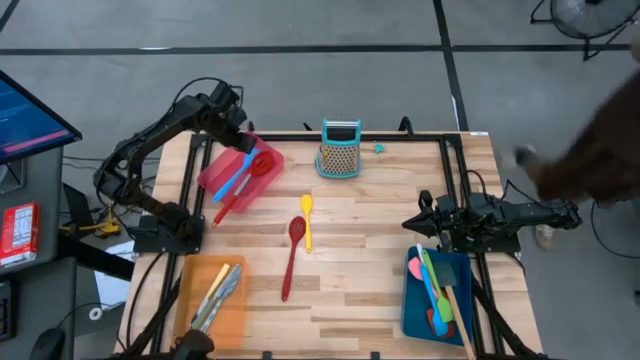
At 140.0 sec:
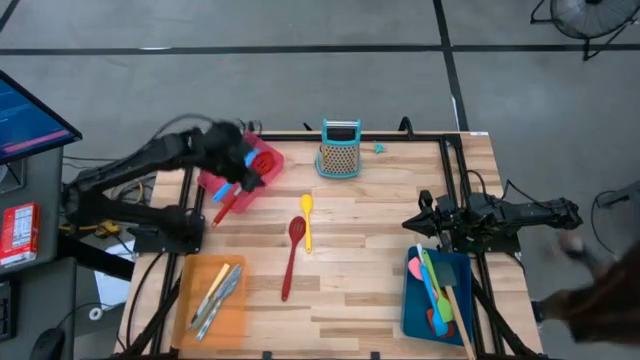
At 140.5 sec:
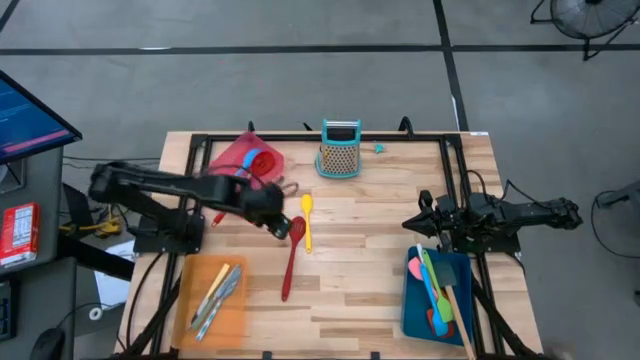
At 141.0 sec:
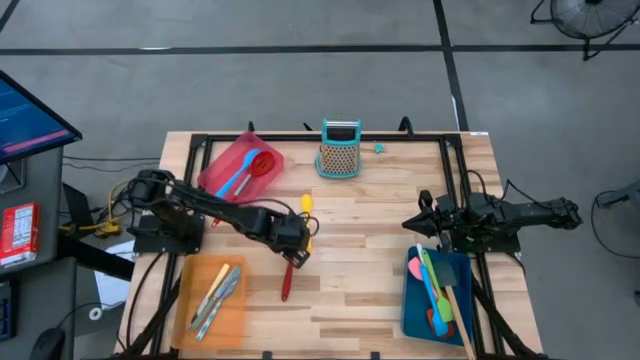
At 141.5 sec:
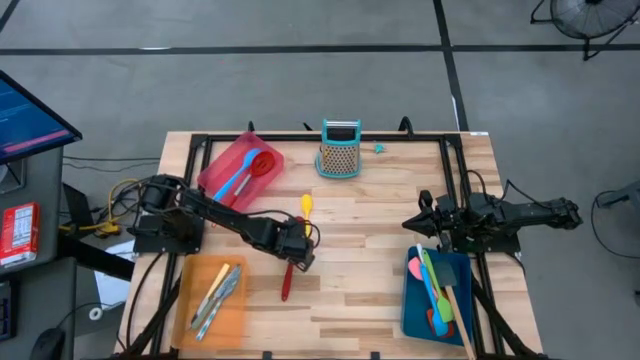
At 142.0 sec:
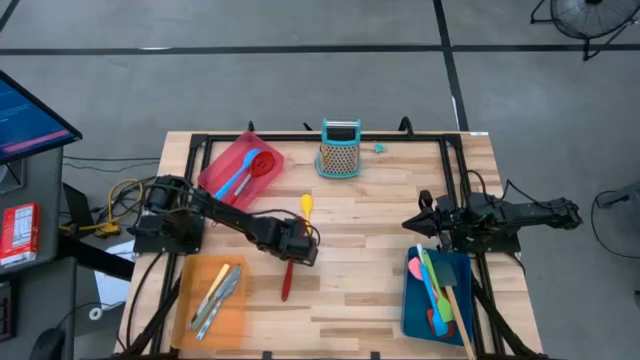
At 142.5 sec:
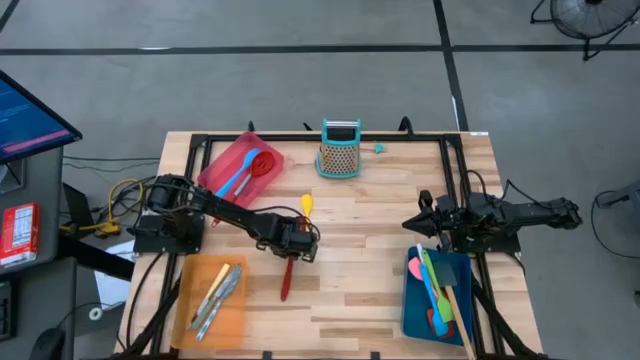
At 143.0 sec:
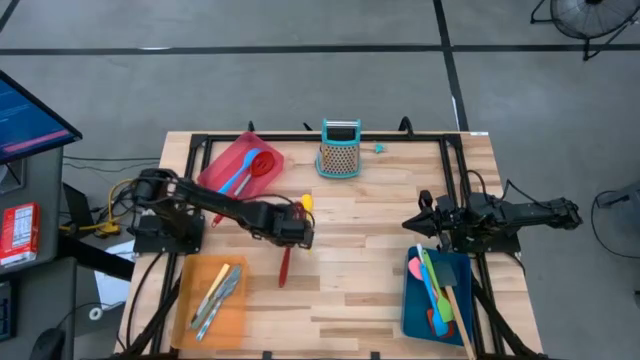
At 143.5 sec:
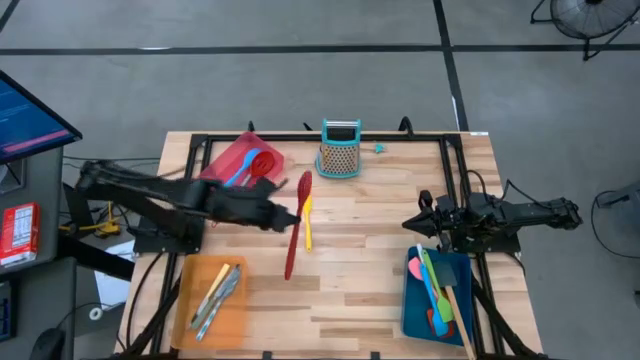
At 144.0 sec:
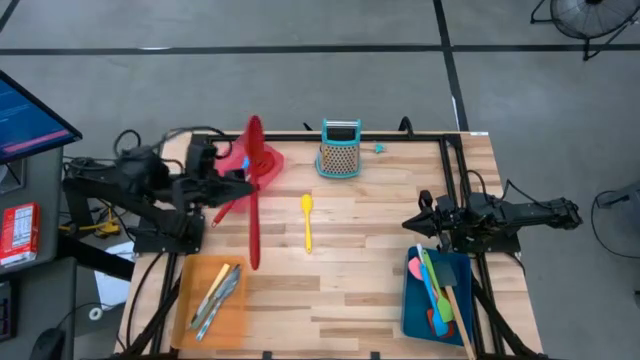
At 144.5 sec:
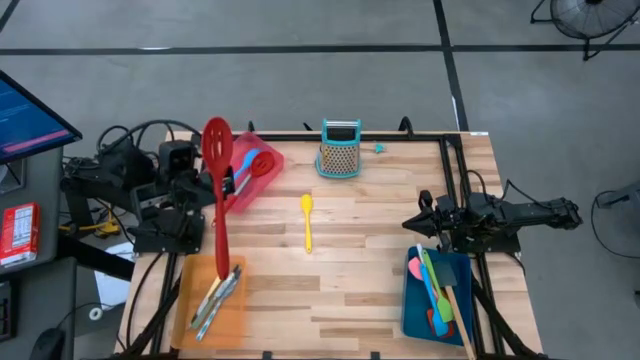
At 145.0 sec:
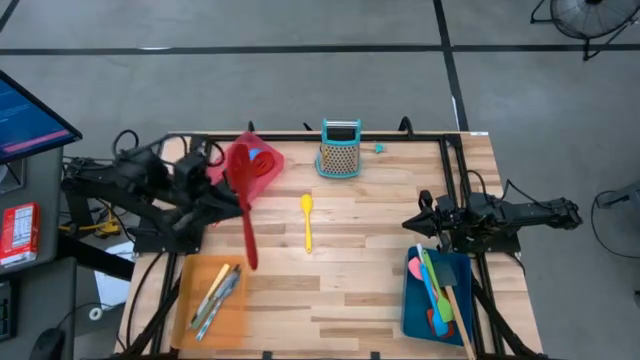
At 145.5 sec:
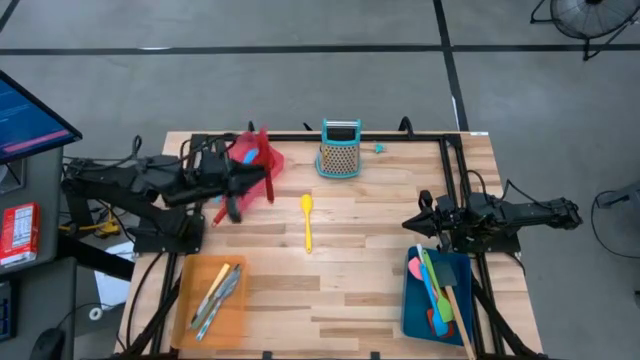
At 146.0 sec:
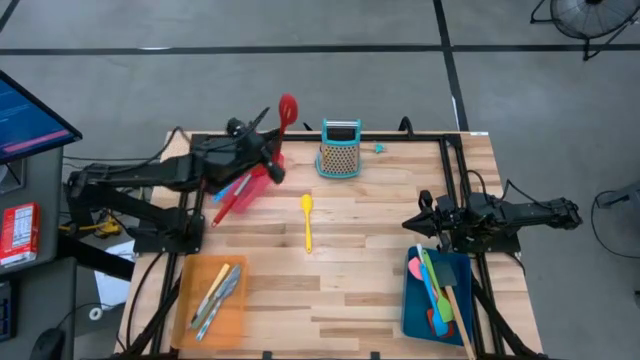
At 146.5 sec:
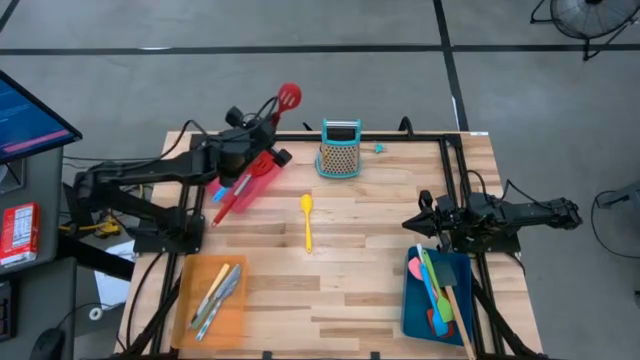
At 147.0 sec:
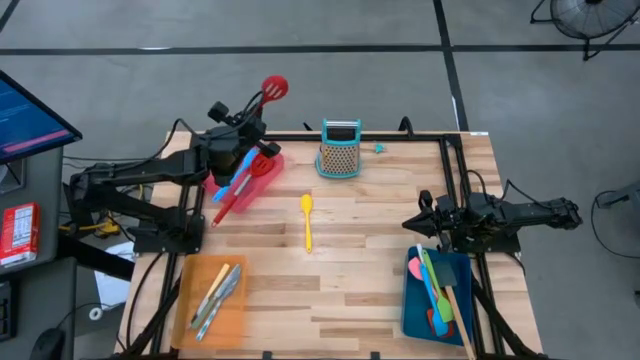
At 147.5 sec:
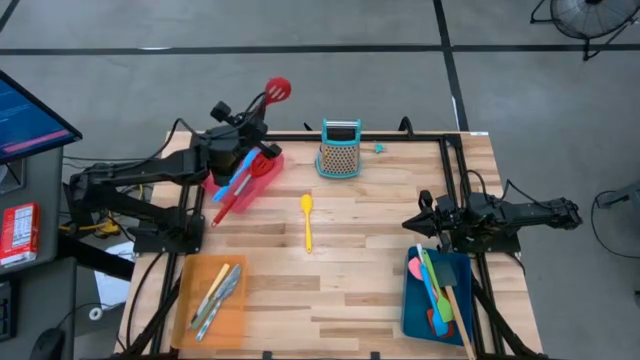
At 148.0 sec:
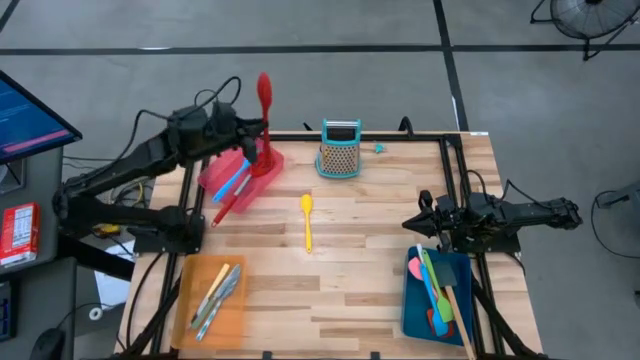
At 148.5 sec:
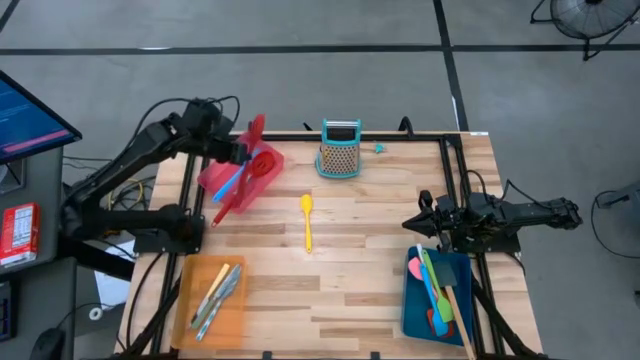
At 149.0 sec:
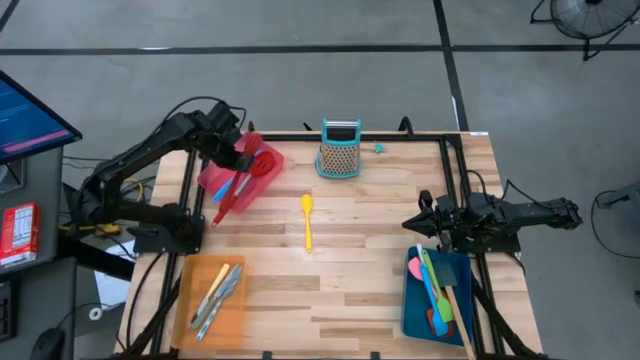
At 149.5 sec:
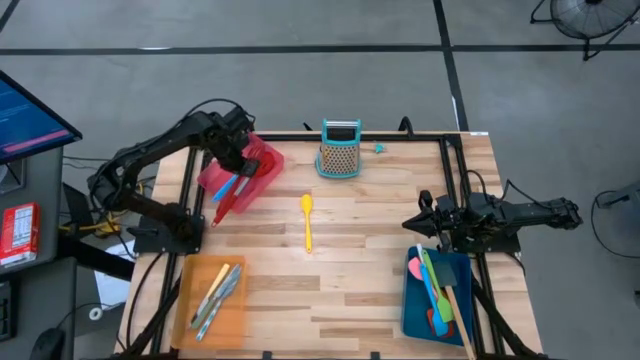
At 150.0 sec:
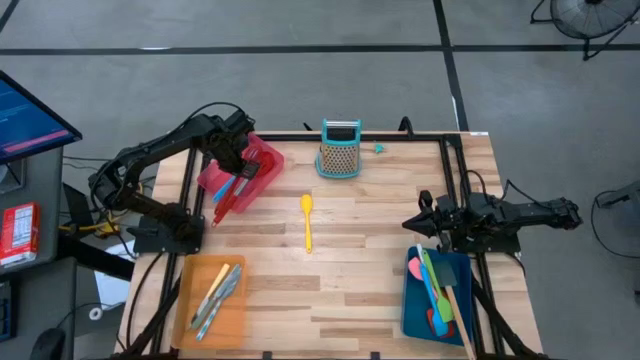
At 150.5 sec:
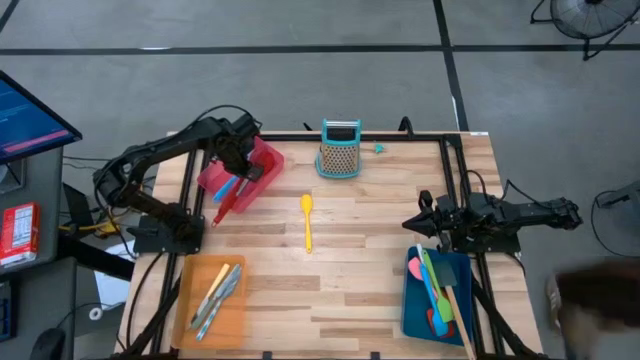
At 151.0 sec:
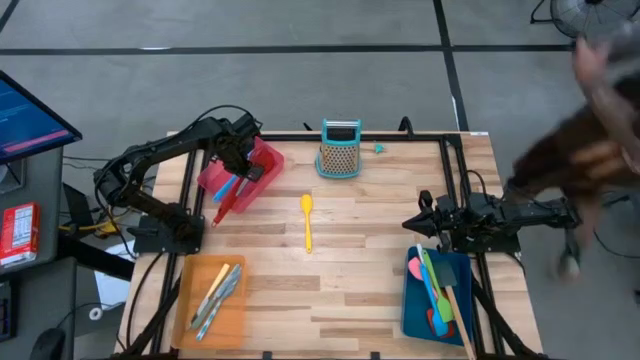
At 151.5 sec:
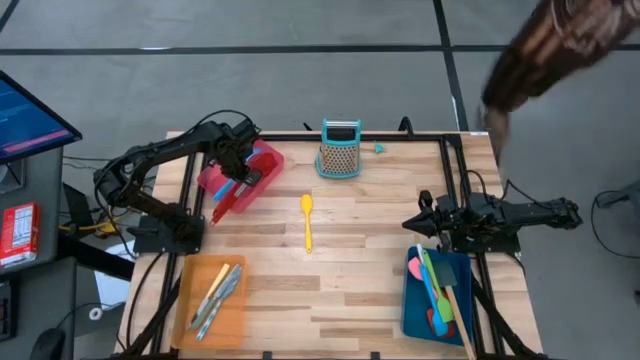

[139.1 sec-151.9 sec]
Task: Pick & Place Kitchen Items
Put the red slotted spoon into the red bin

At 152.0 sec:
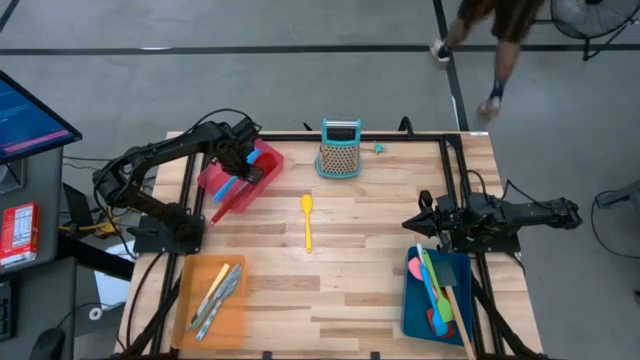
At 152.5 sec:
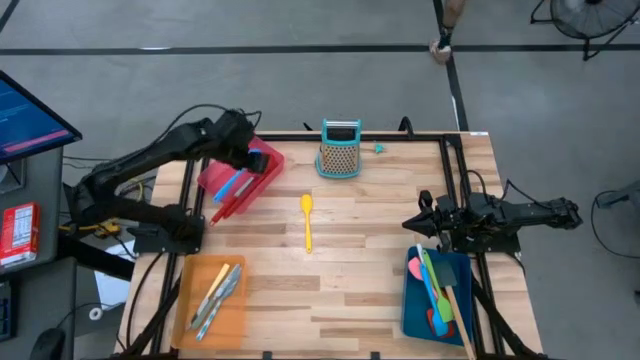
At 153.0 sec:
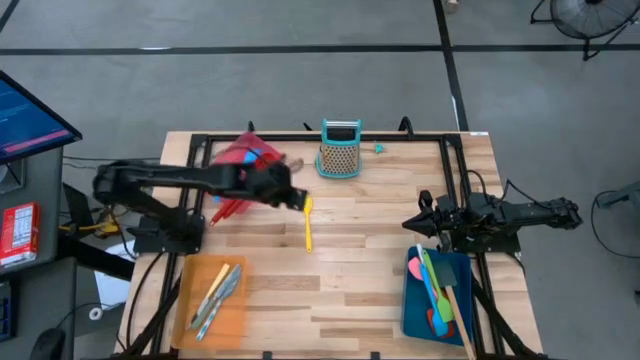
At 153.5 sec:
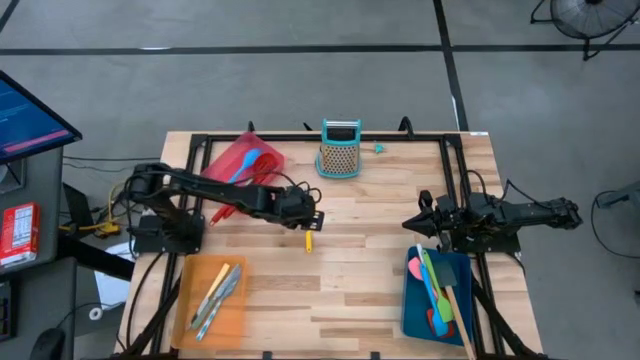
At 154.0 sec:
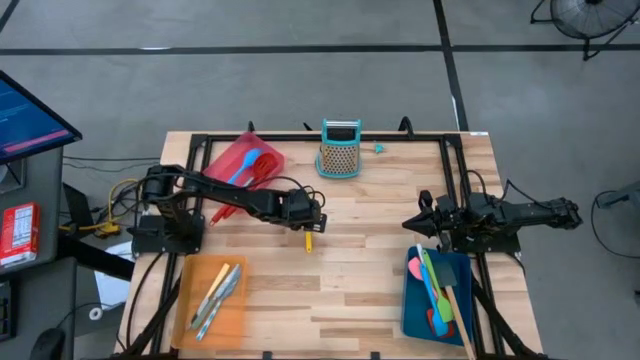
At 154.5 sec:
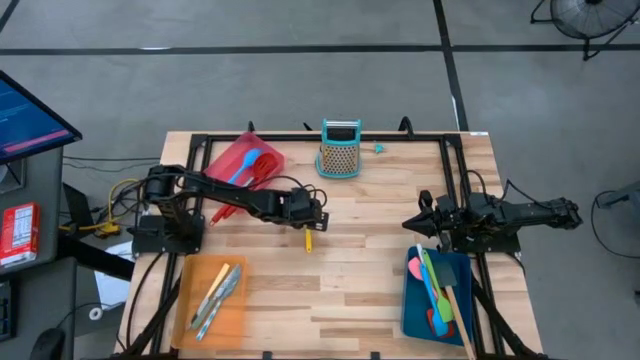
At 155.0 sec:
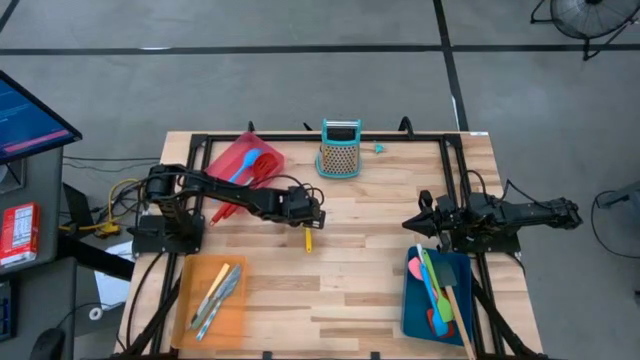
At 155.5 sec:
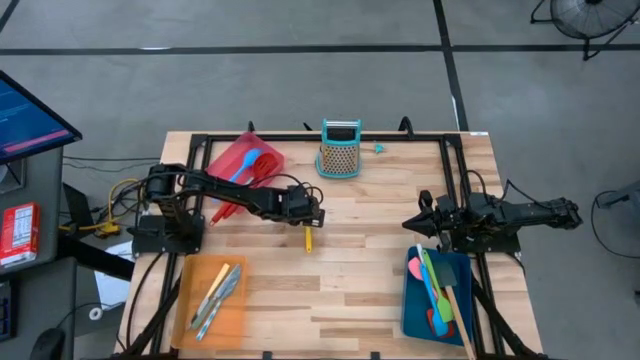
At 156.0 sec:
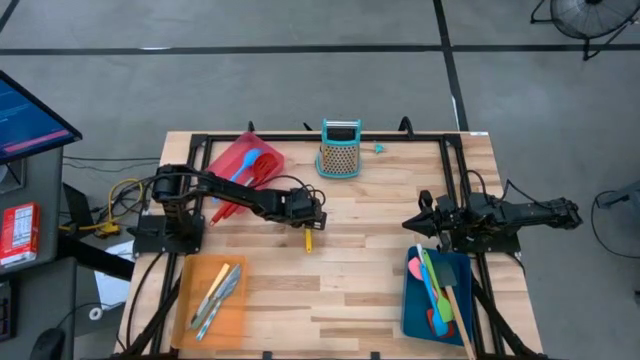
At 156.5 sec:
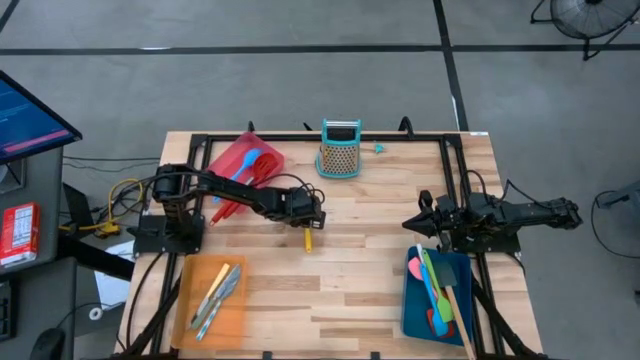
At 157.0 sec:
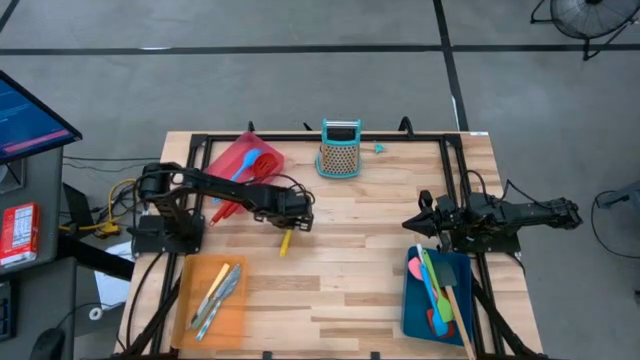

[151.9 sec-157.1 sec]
Put the yellow serving spoon into the red bin

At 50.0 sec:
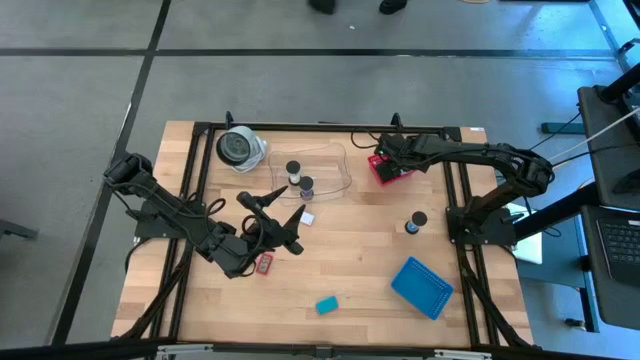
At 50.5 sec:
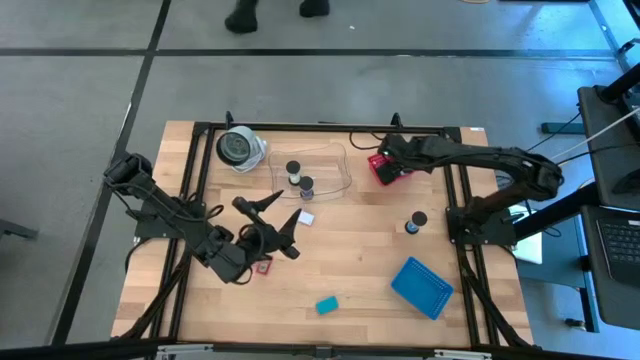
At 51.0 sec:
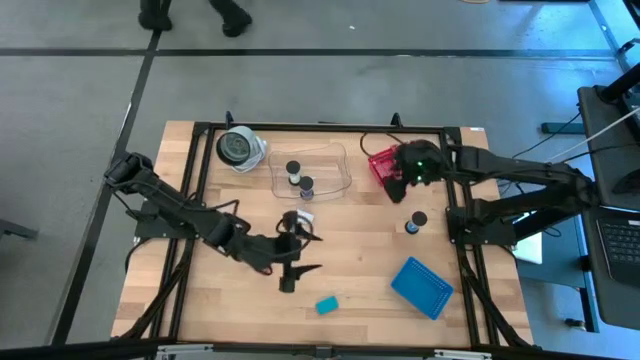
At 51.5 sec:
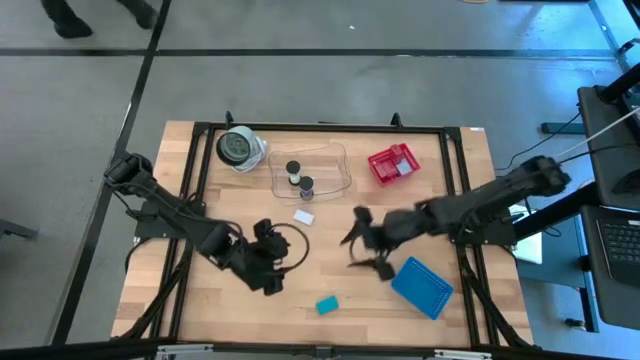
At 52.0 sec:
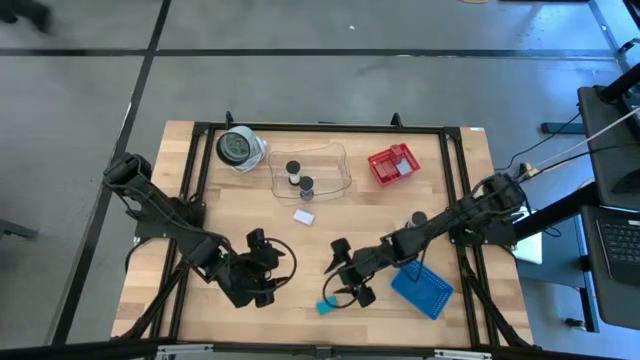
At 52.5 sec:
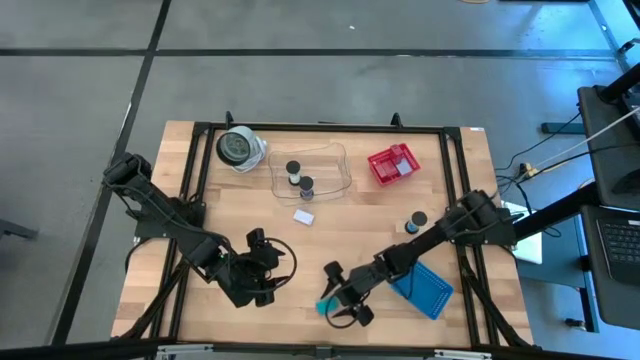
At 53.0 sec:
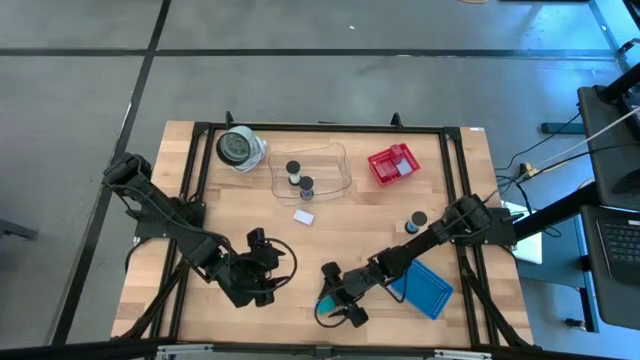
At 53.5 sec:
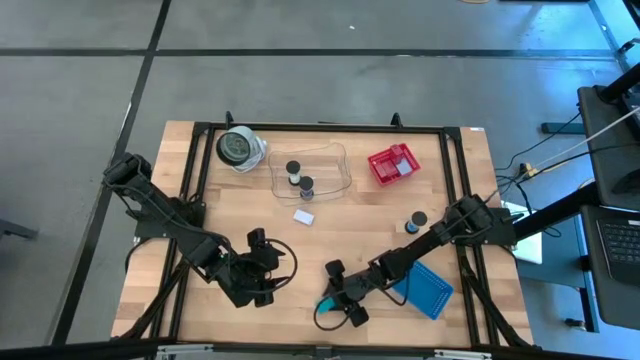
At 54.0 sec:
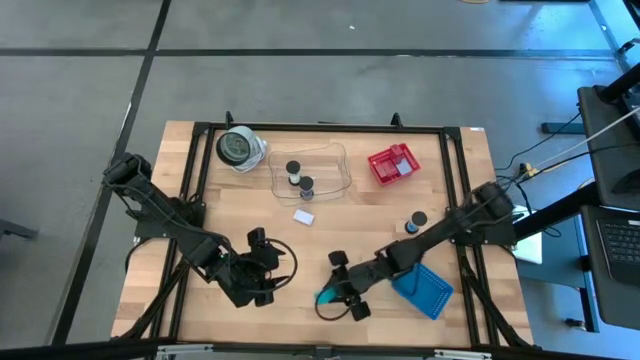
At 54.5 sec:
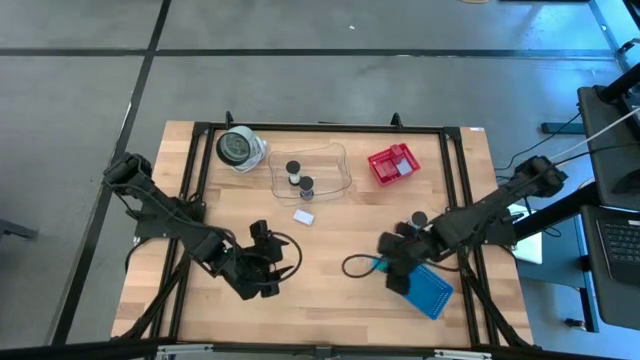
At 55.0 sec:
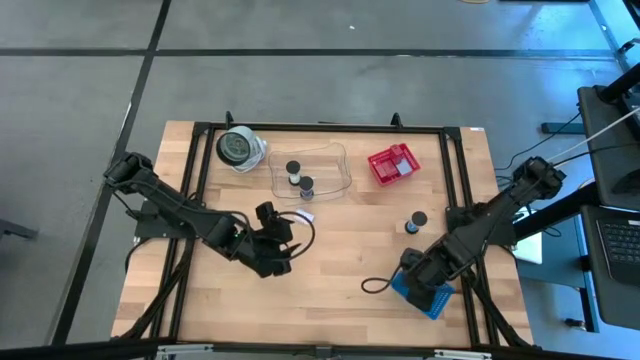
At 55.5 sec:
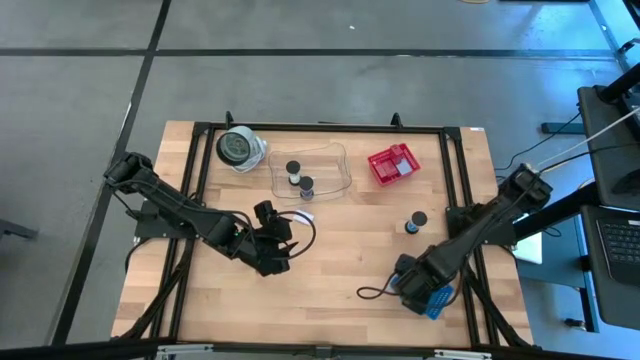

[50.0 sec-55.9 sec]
Task: Pick & Place Office items
Put the blue digital timer into the blue bin
